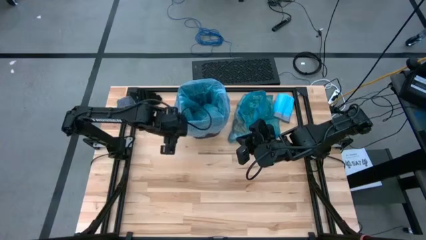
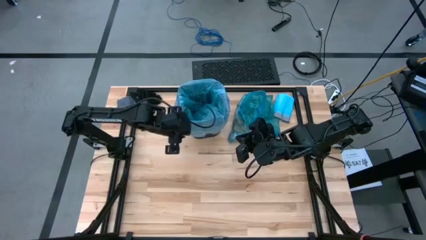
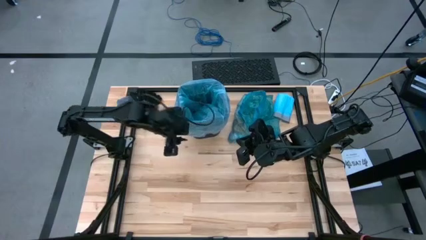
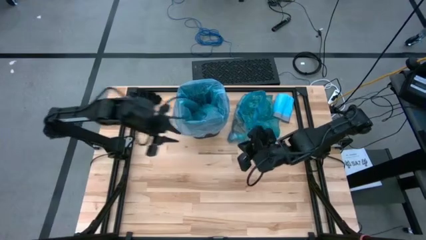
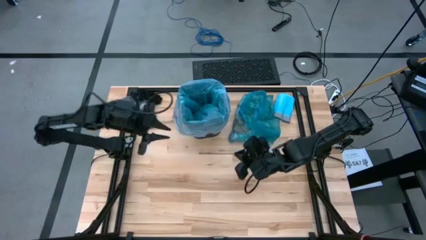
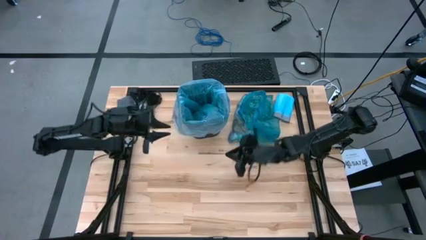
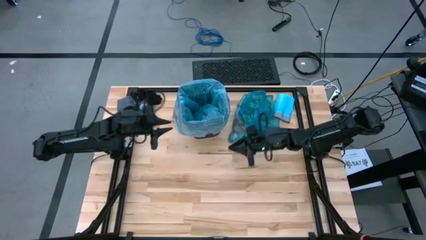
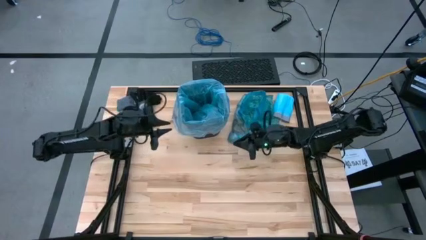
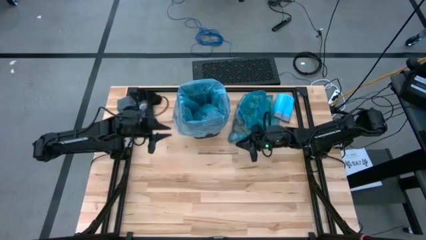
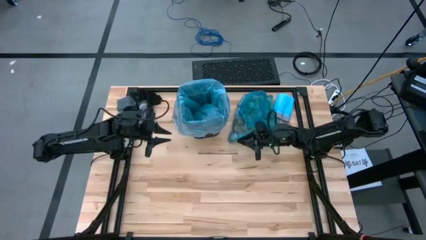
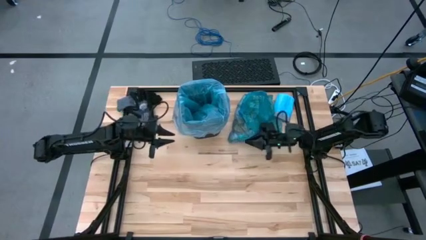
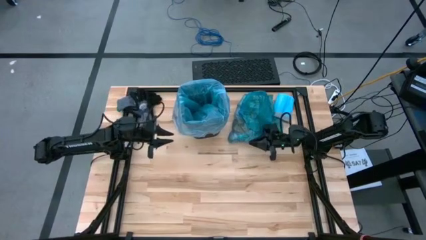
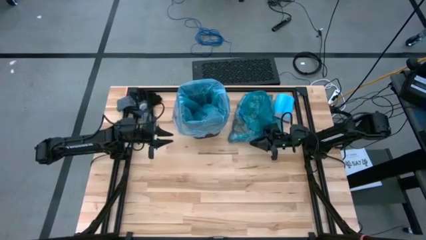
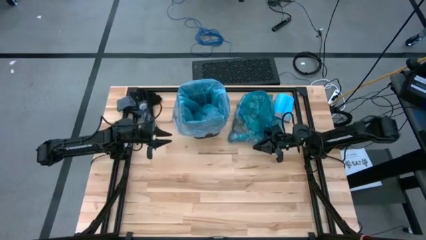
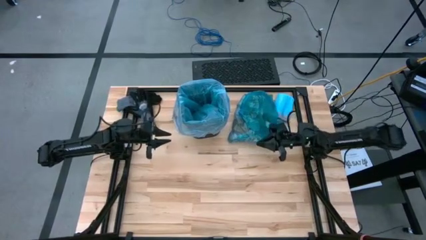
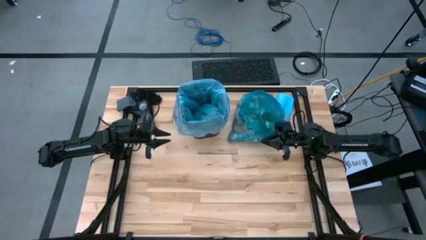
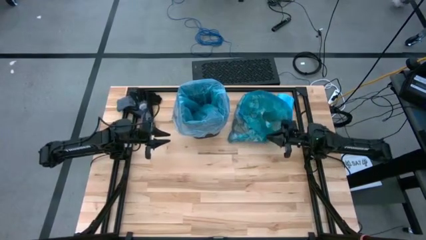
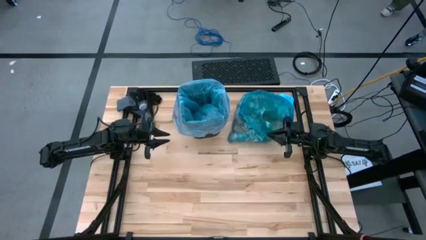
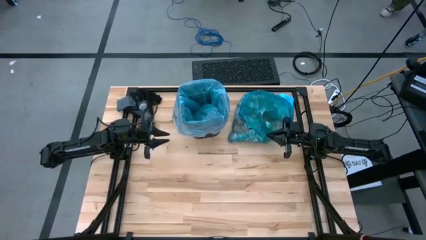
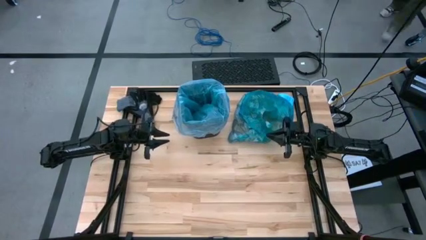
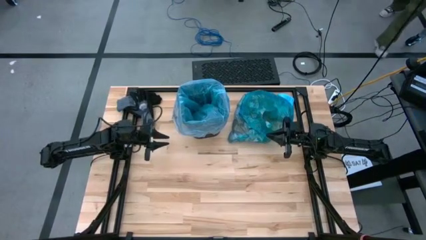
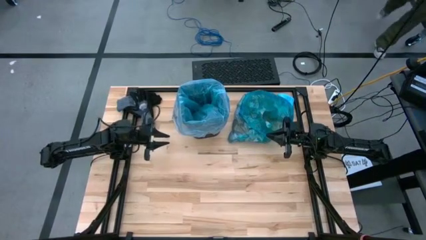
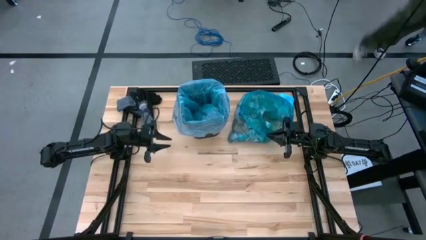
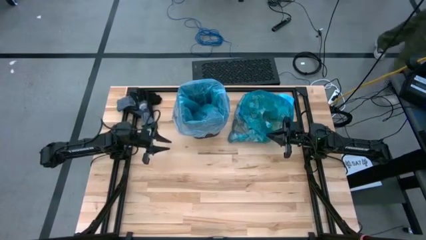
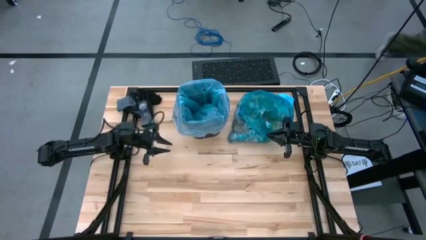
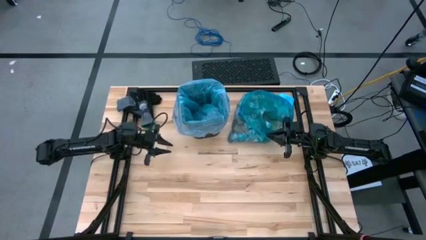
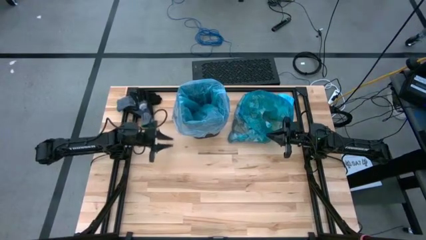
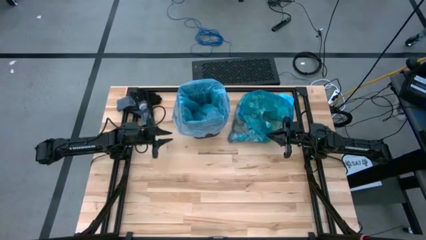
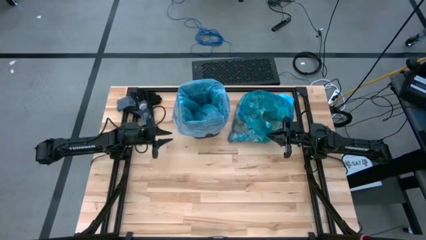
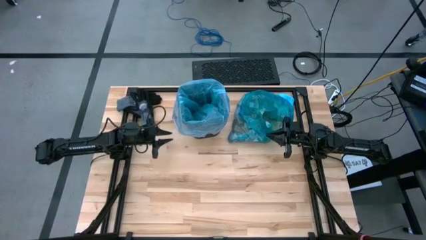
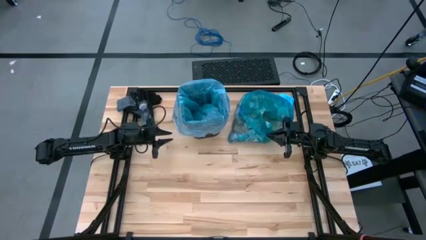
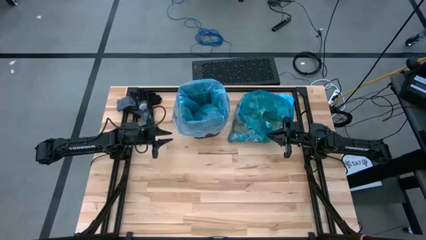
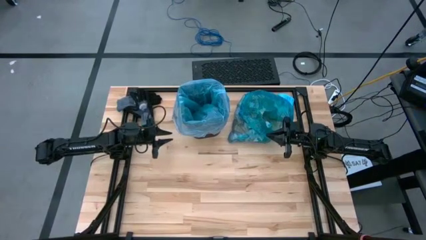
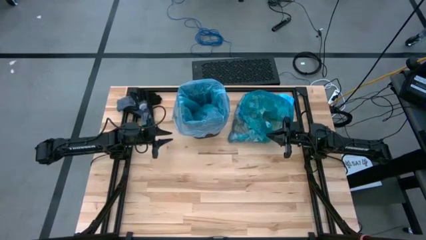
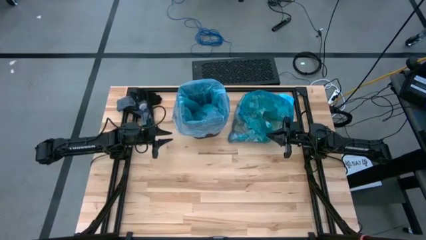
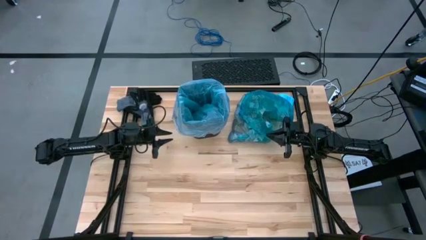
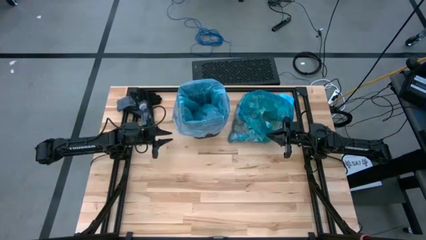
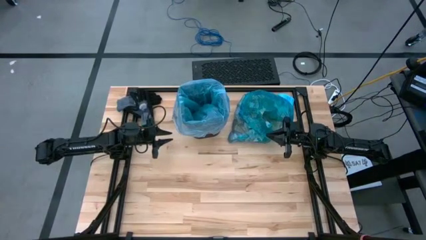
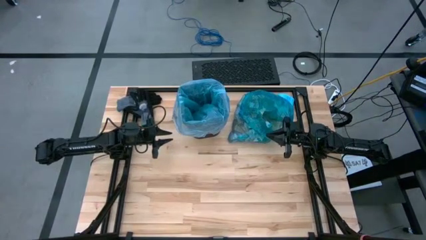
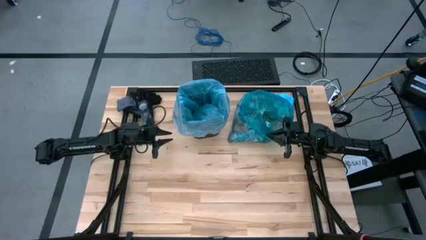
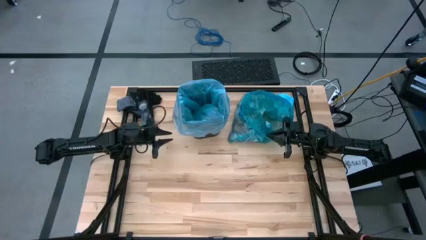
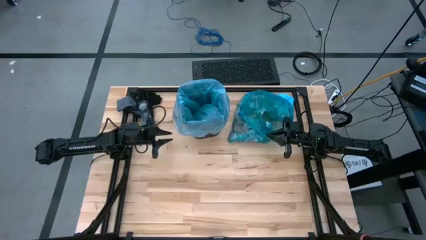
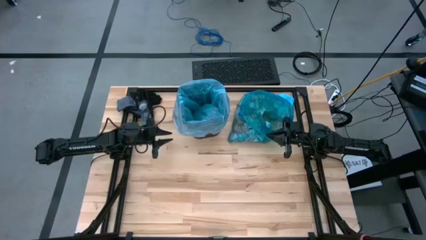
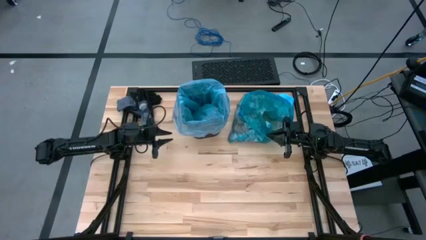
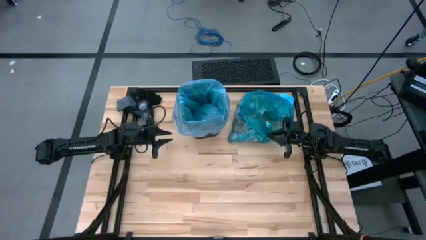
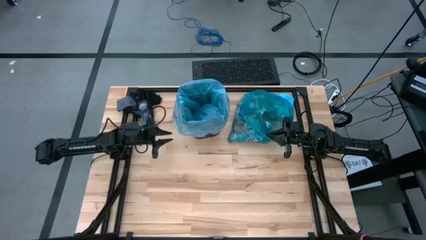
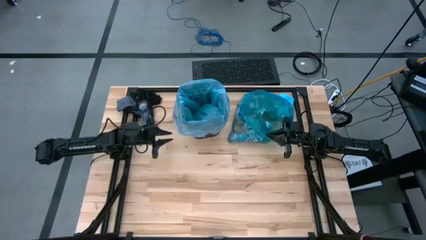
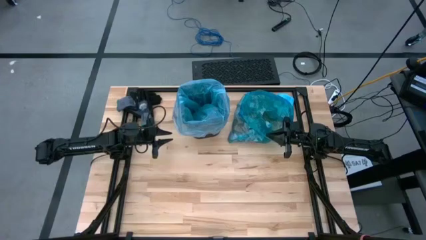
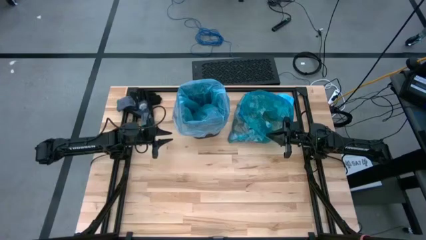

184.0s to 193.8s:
Task: place trash/remove bag and relplace
Return to Home Position

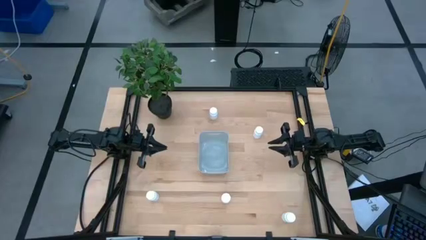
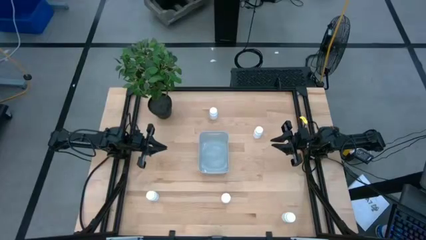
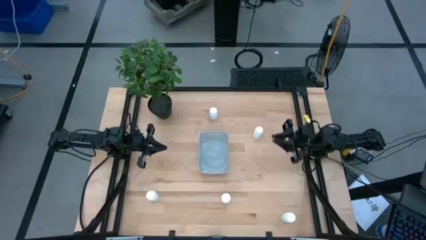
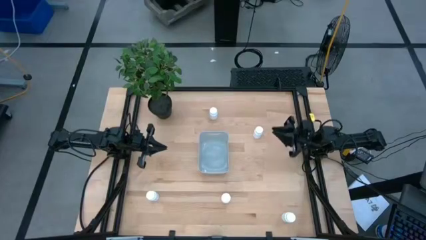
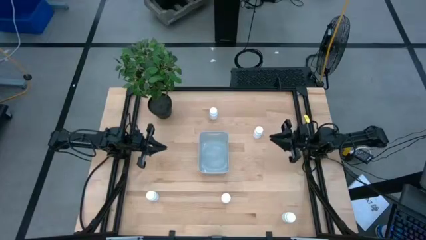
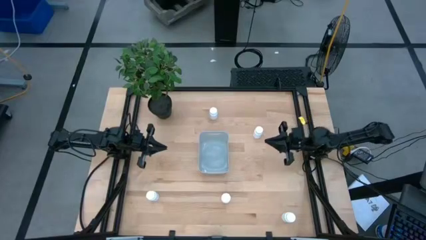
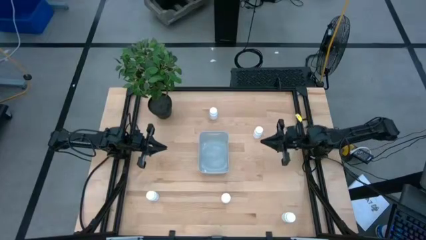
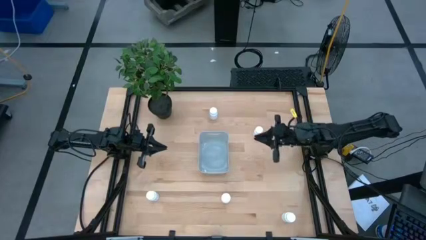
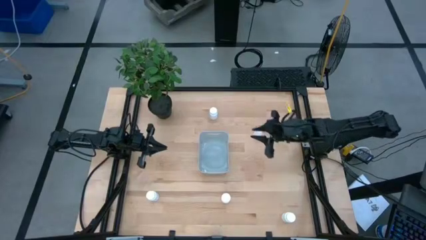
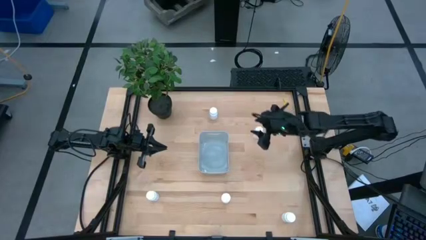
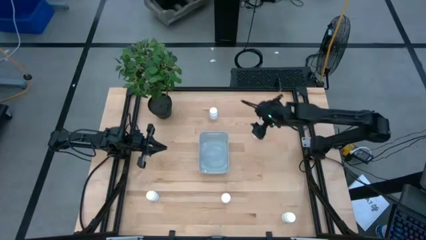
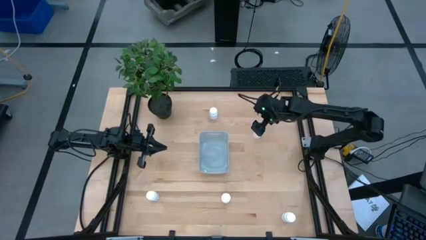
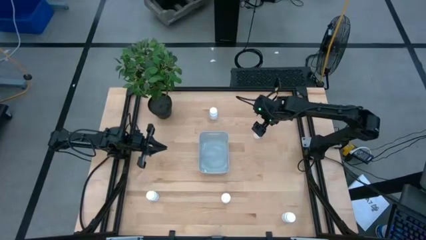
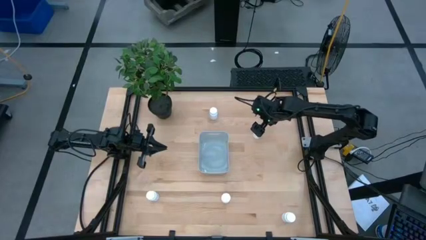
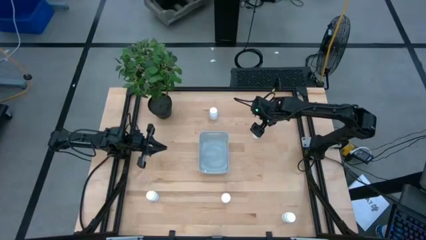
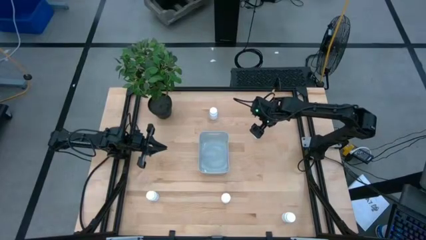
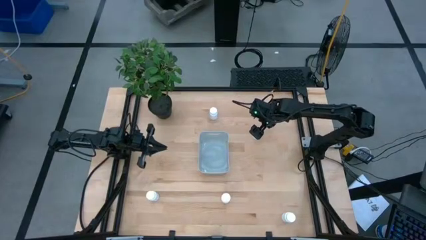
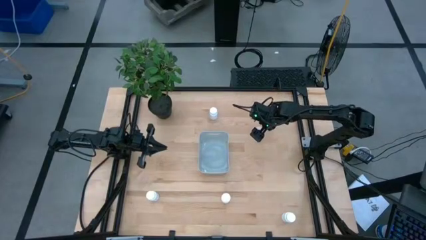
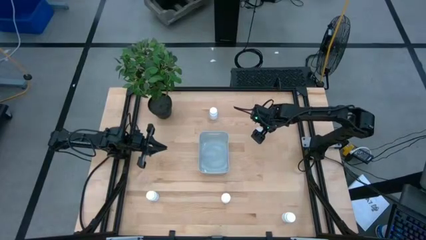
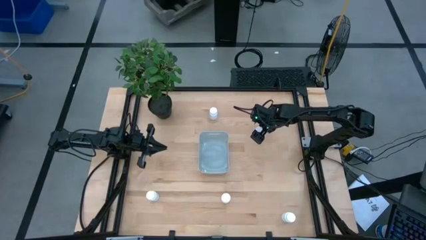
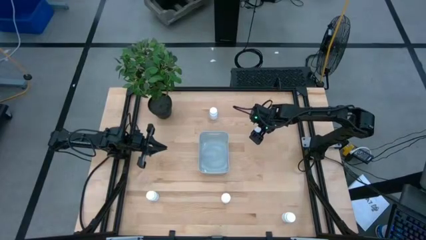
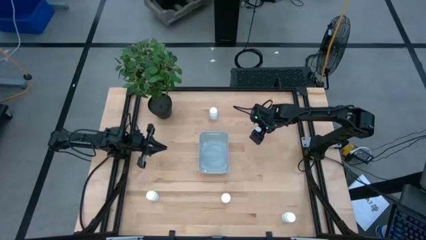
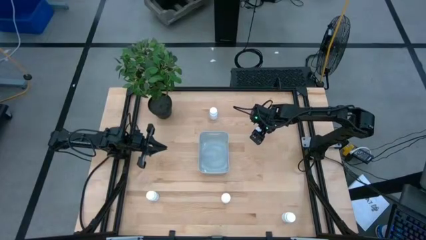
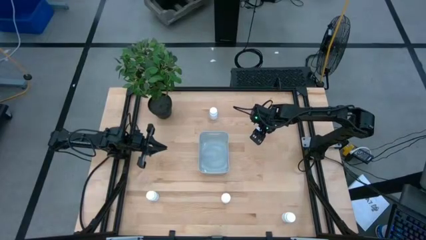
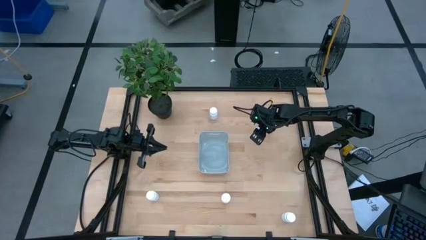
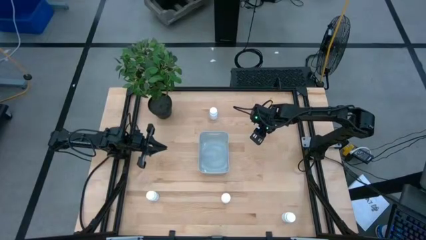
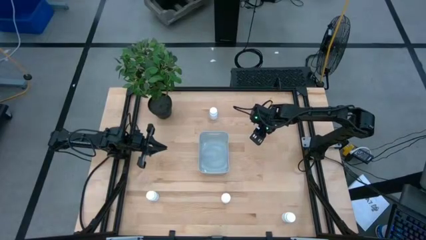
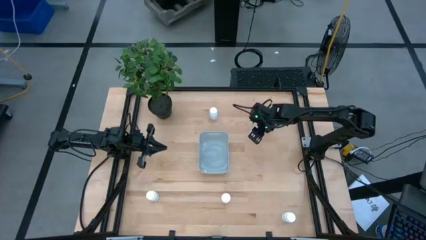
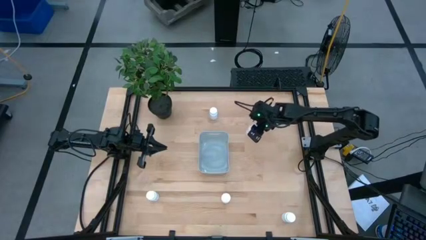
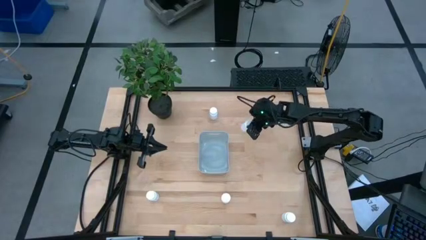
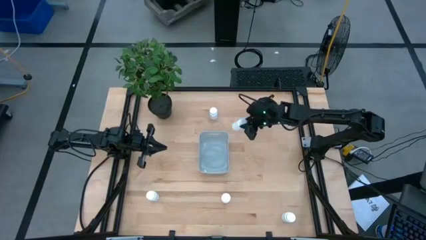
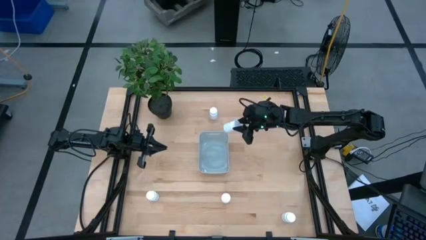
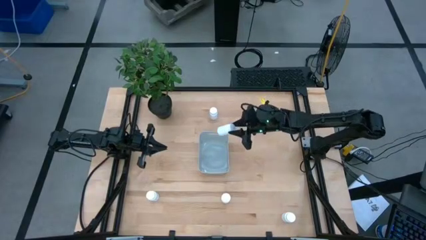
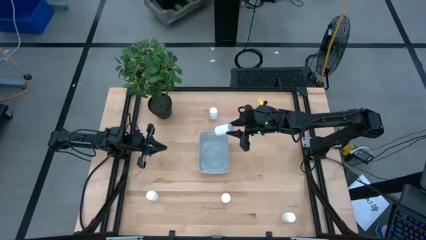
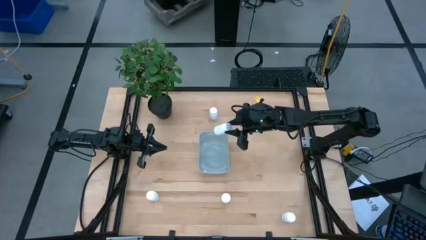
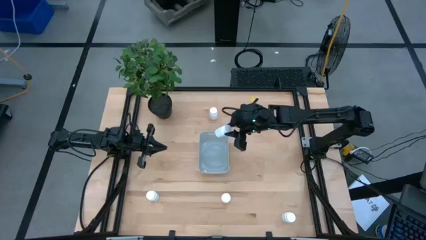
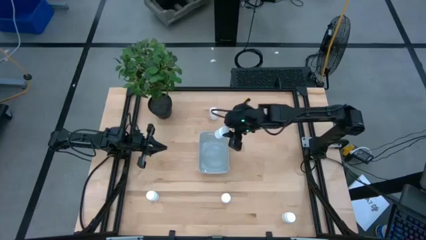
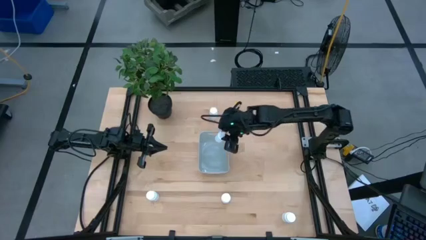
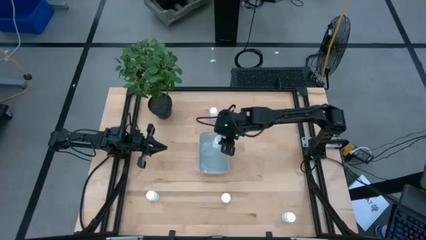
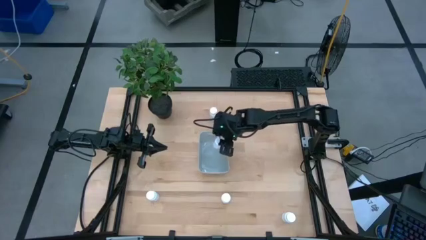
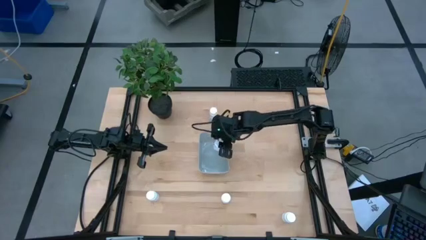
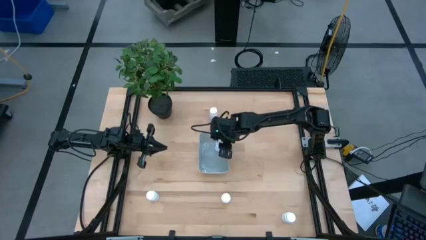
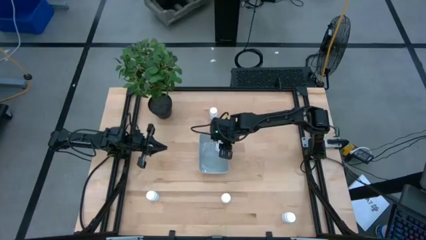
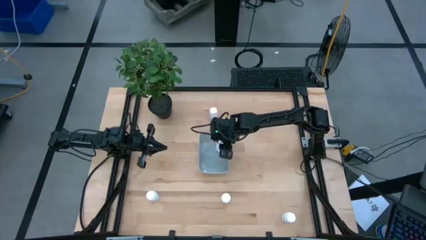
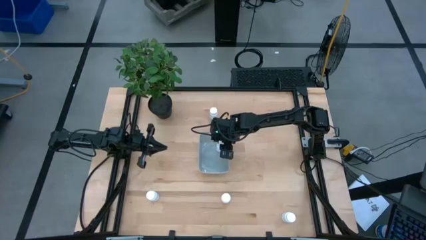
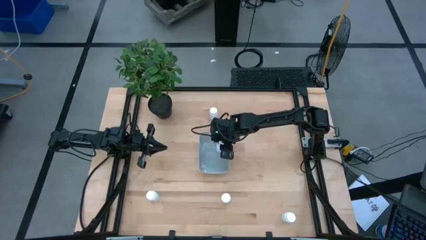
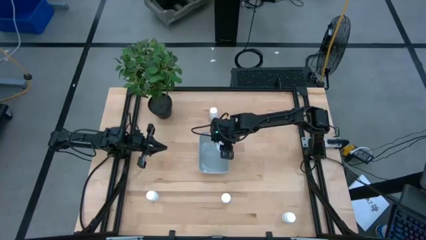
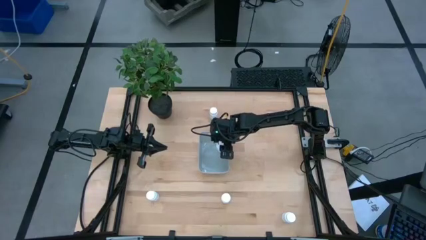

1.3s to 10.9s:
Task: Pick and place pill bottles into a basket
Put the white medicine bottle into the gray bin
